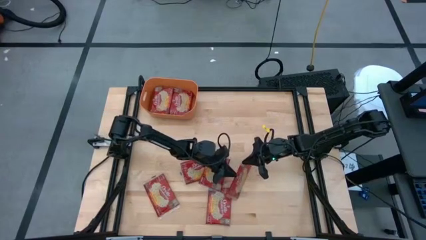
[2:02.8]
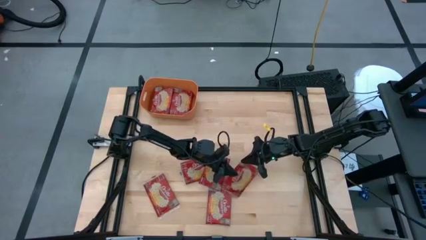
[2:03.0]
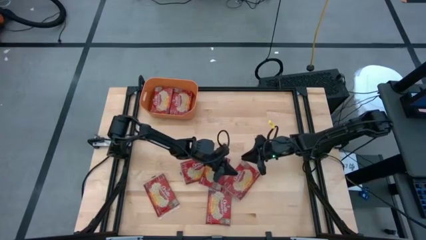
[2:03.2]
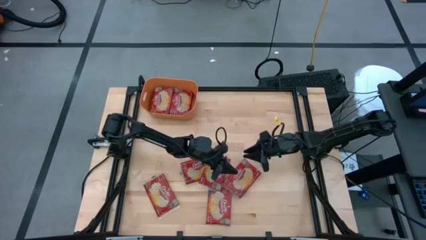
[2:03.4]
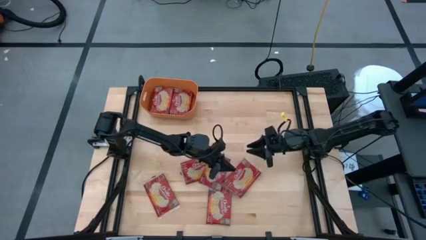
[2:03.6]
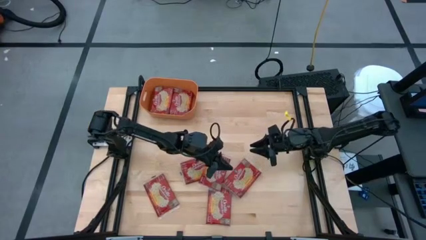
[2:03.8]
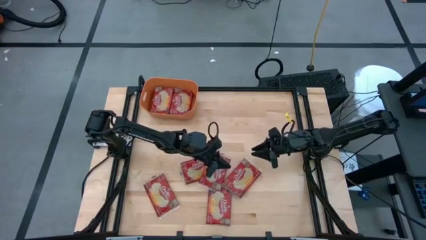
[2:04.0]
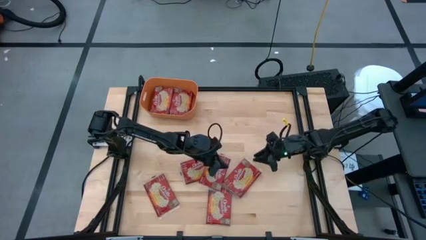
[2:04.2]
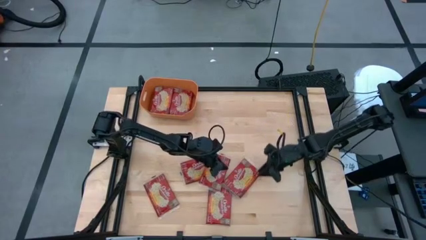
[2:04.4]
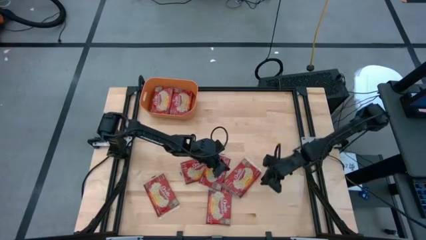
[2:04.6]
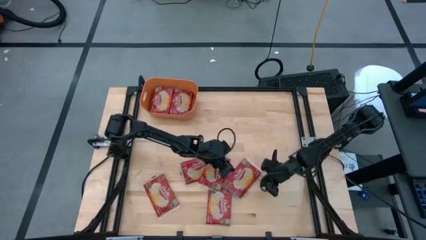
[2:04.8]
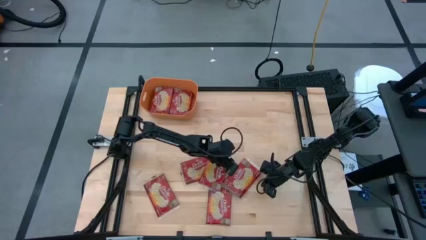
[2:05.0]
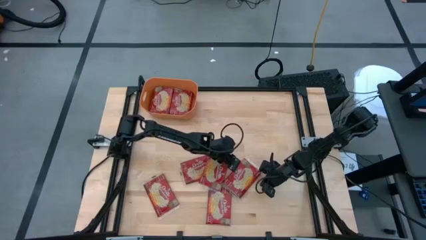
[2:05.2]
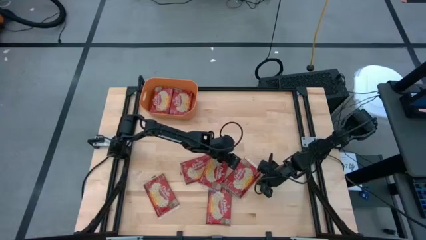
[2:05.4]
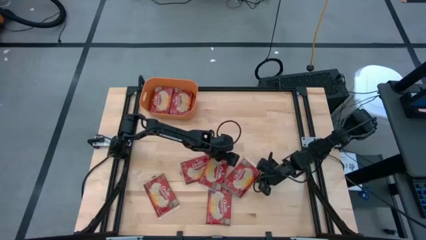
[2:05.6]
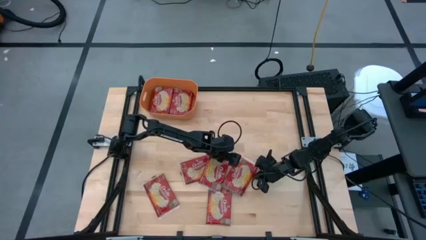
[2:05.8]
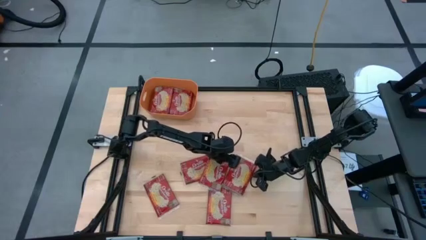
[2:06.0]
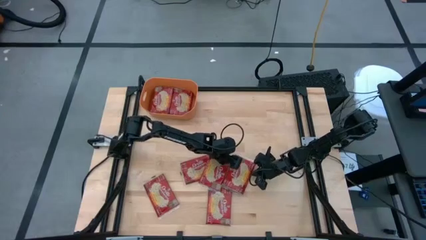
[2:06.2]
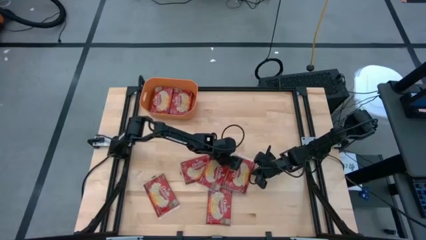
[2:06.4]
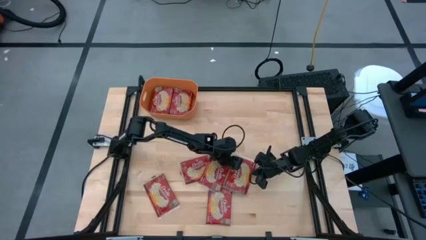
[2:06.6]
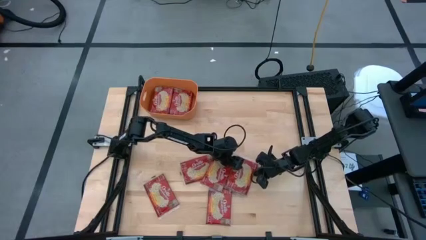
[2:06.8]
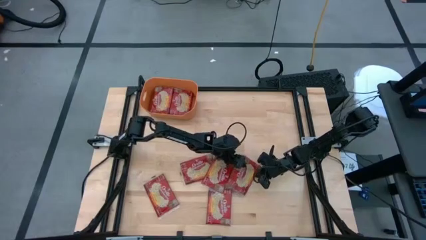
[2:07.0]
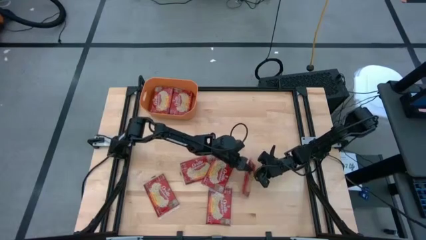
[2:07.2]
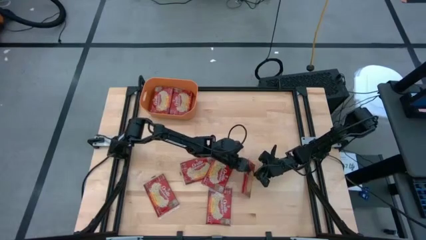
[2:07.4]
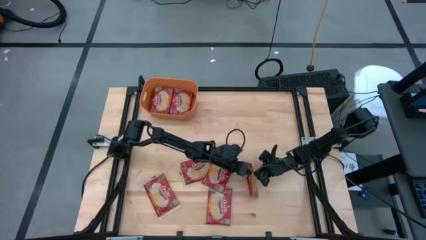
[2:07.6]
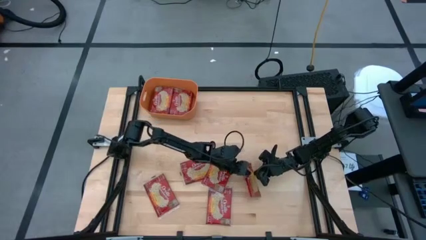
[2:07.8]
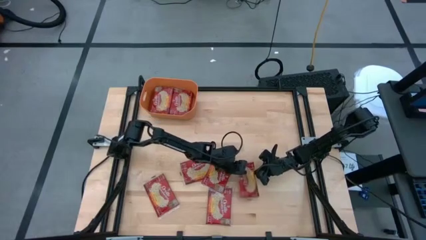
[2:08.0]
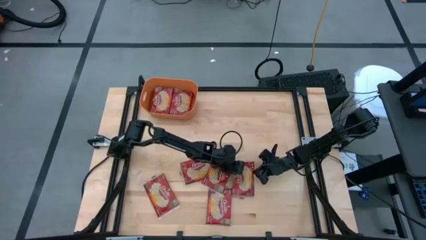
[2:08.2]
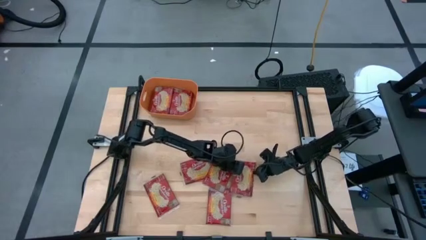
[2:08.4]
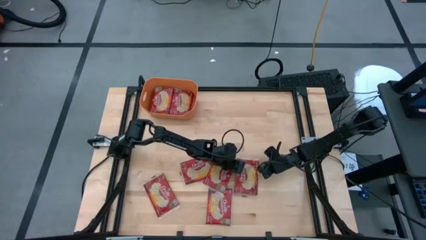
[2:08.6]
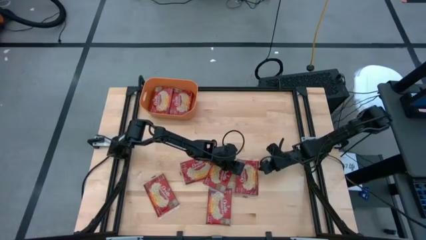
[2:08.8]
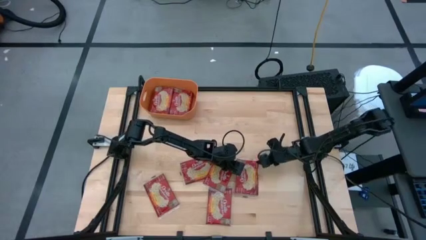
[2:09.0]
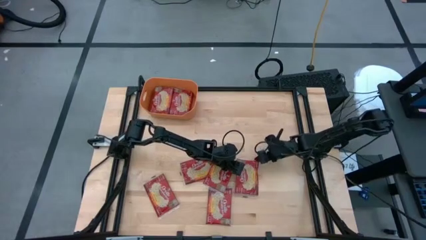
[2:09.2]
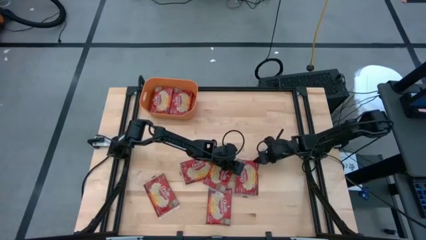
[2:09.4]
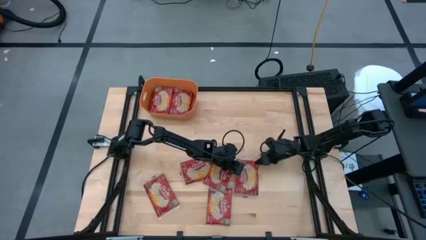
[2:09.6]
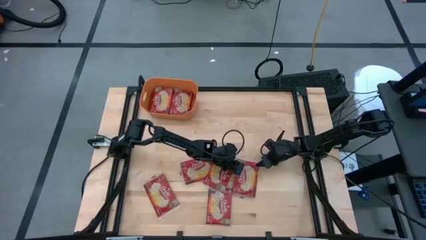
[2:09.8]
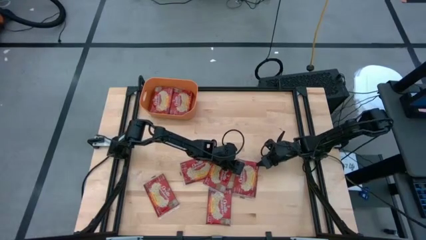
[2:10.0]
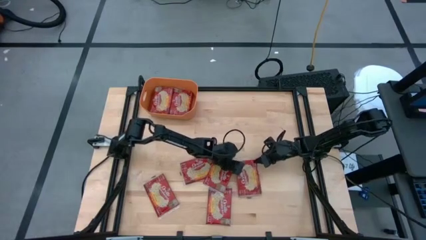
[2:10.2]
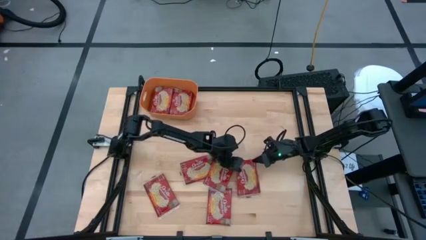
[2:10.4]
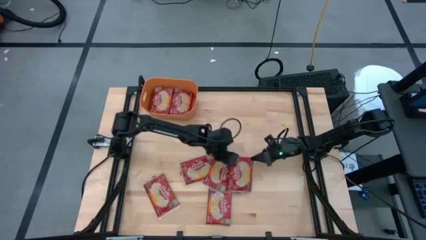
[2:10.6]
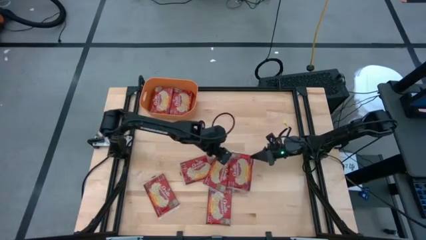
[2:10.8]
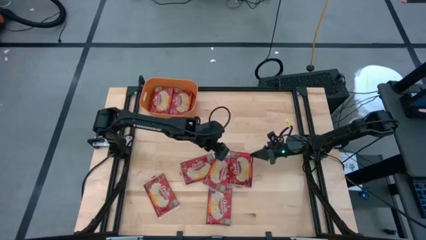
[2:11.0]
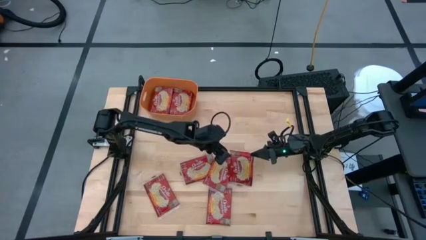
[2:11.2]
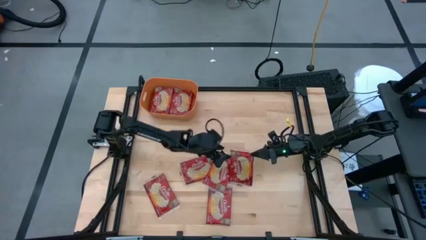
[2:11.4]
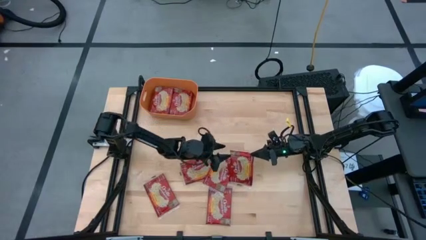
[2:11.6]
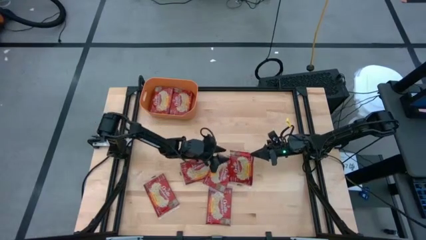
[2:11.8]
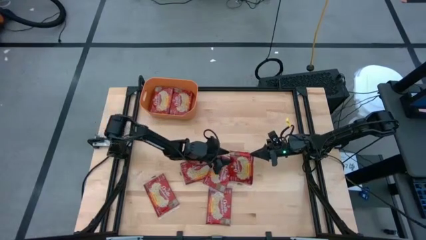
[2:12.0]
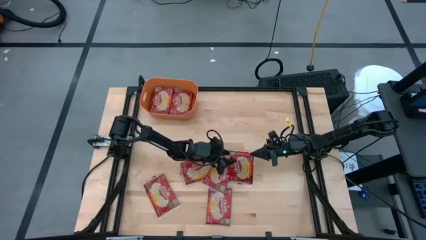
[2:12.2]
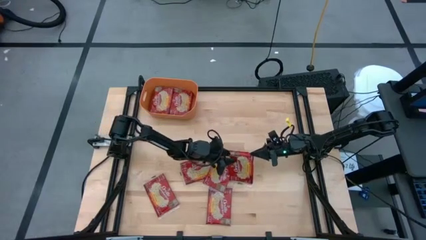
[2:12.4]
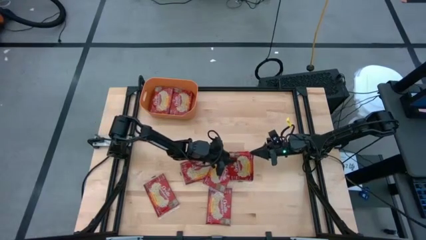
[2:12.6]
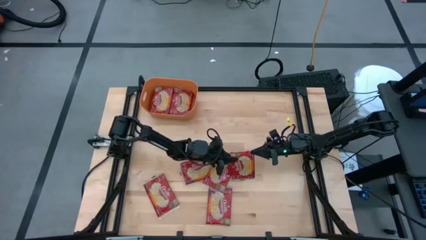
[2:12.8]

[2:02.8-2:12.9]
Task: Sort popcorn bags into baskets
Stack the red popcorn bag on top of the red popcorn bag in the orange bin

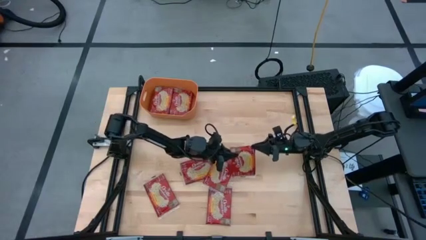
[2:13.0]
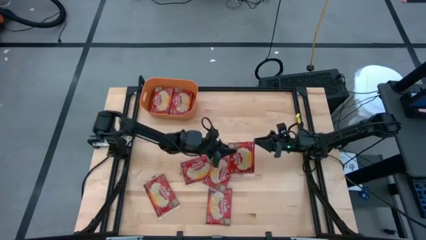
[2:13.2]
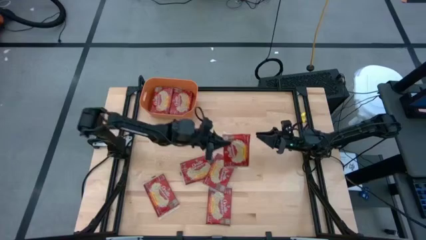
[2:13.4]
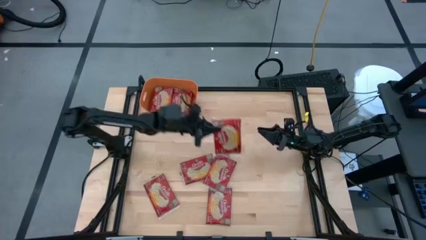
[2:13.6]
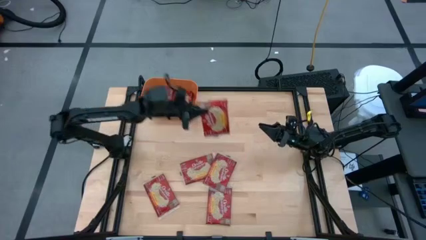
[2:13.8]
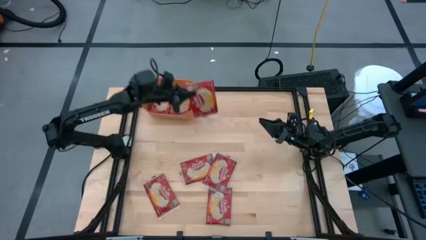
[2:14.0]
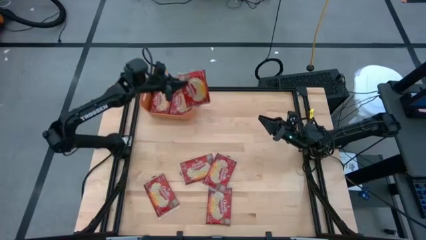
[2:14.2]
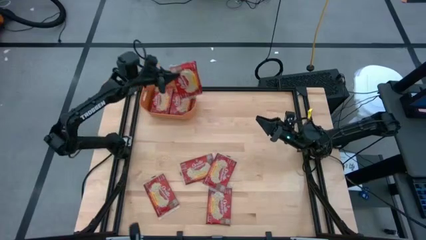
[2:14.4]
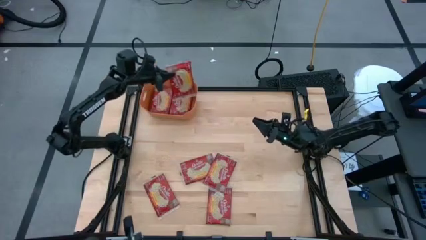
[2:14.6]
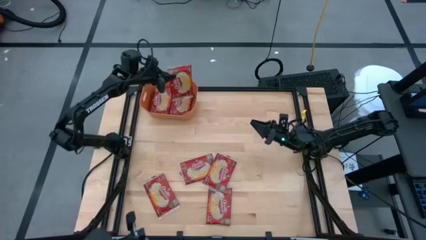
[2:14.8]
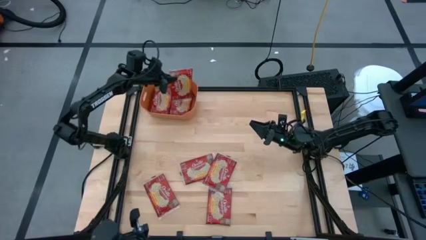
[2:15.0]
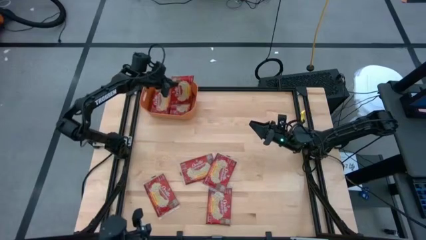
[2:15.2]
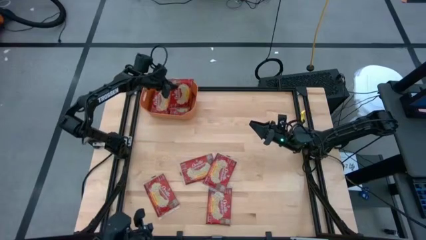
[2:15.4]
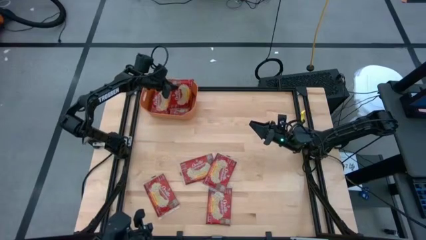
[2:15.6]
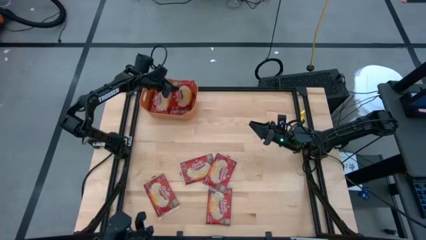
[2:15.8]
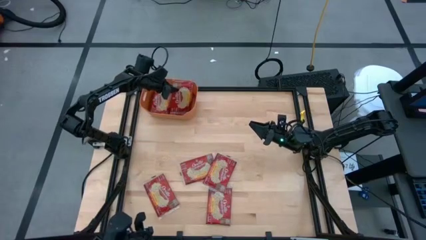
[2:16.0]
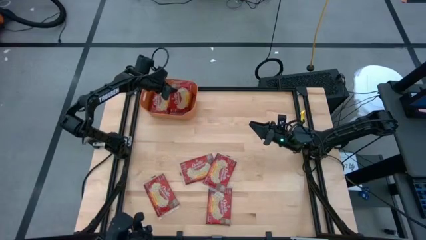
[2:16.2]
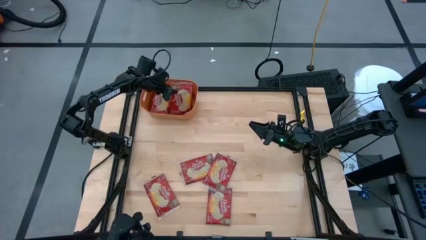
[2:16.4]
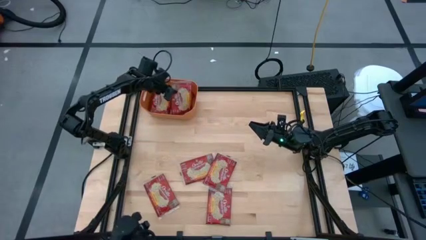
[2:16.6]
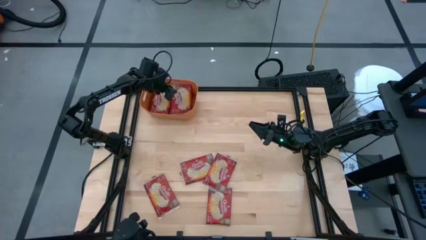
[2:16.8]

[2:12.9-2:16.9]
Stack the red popcorn bag on top of the red popcorn bag in the orange bin
